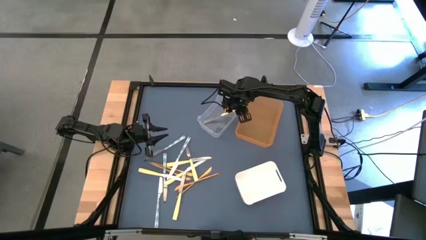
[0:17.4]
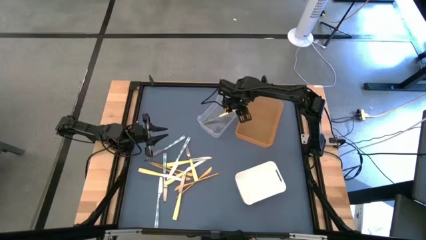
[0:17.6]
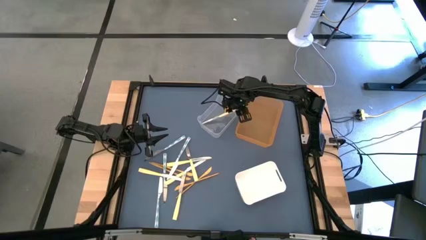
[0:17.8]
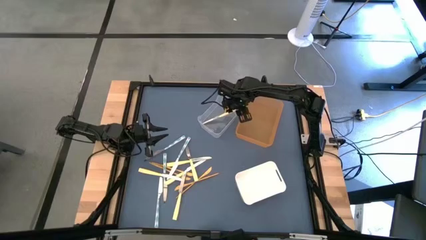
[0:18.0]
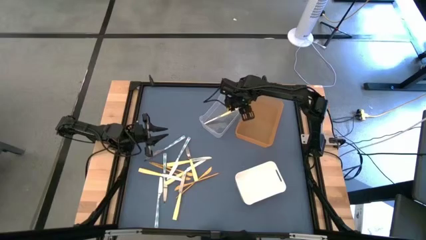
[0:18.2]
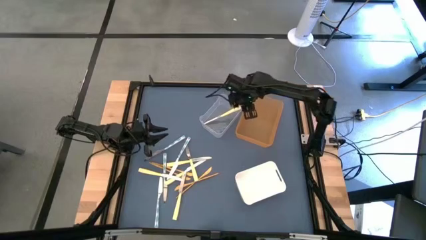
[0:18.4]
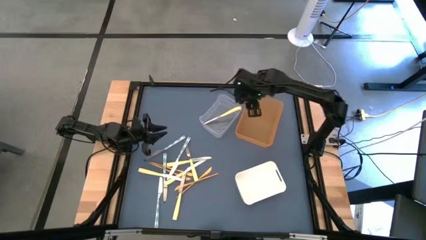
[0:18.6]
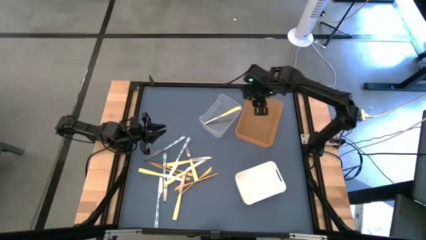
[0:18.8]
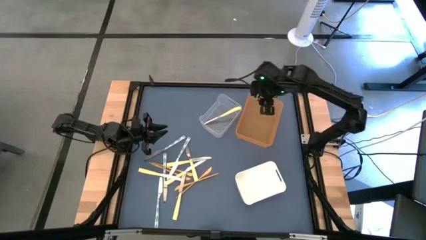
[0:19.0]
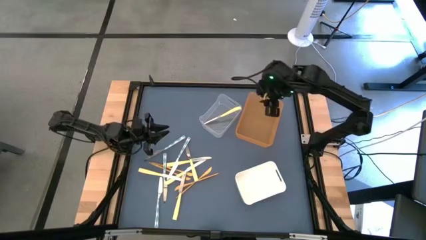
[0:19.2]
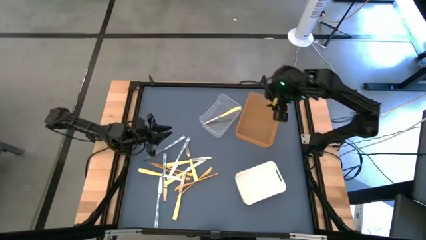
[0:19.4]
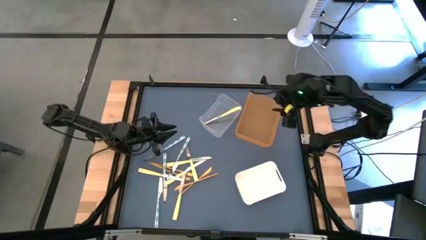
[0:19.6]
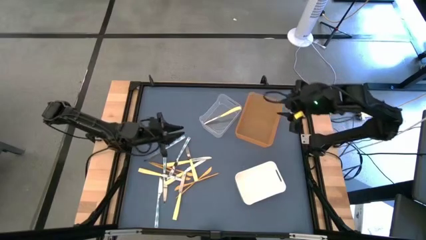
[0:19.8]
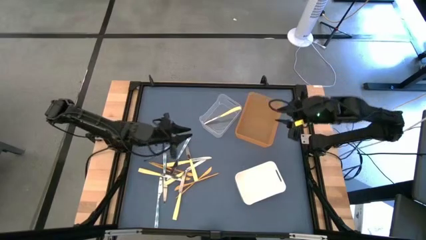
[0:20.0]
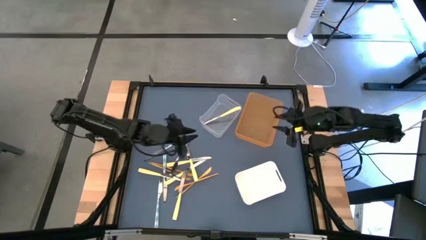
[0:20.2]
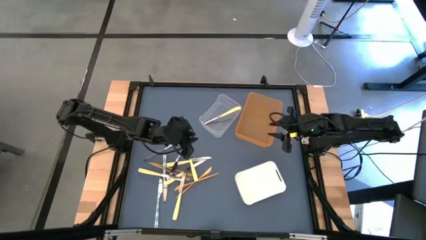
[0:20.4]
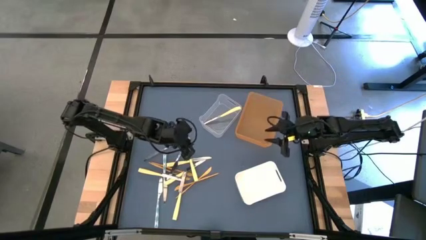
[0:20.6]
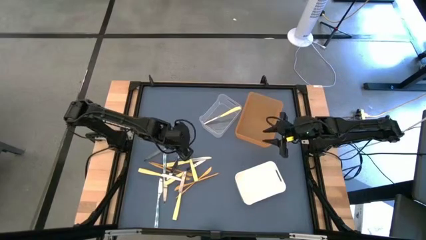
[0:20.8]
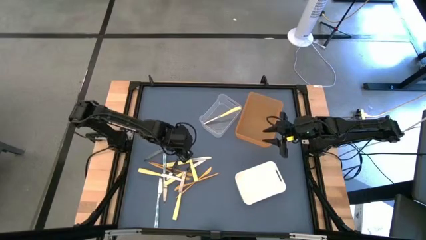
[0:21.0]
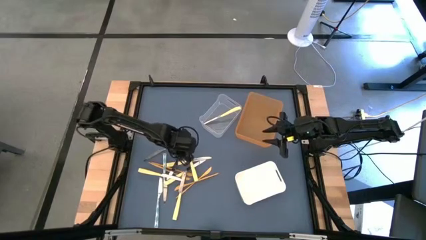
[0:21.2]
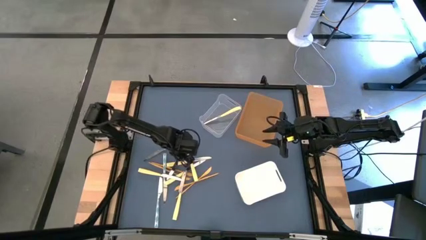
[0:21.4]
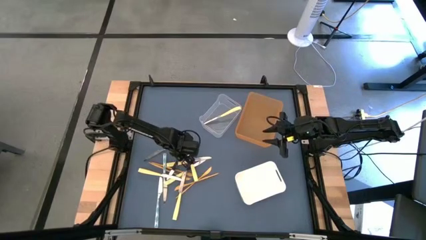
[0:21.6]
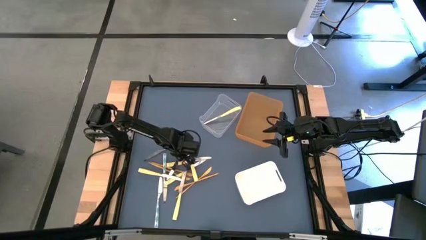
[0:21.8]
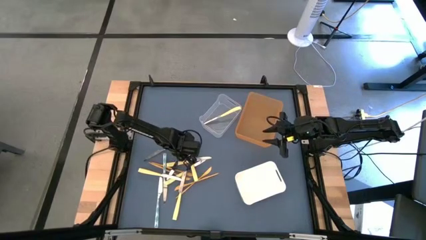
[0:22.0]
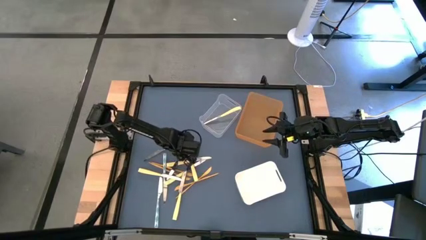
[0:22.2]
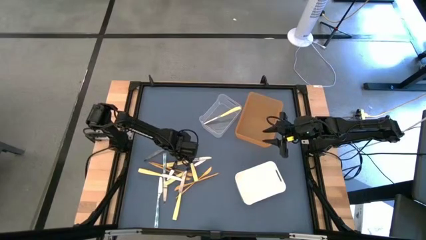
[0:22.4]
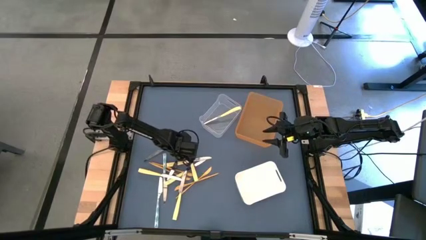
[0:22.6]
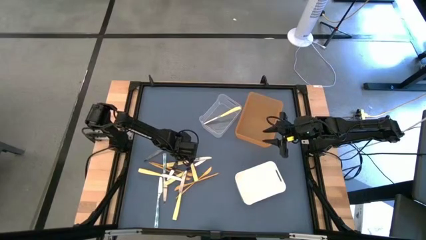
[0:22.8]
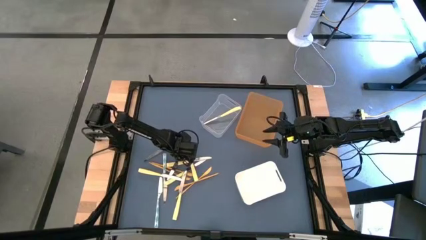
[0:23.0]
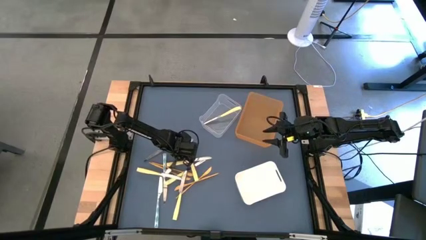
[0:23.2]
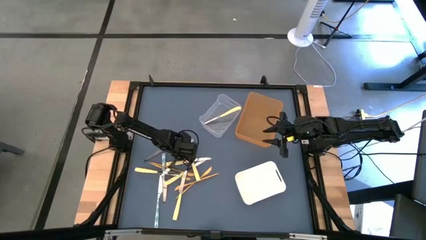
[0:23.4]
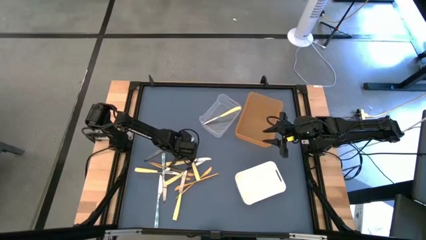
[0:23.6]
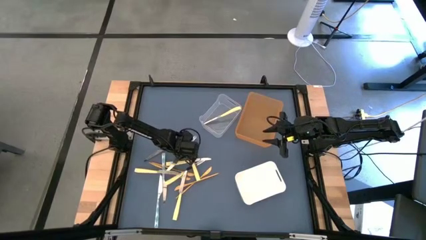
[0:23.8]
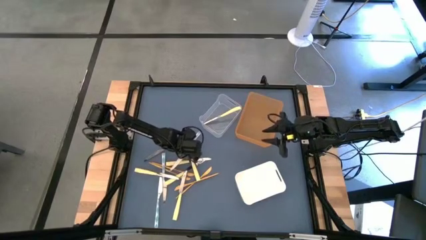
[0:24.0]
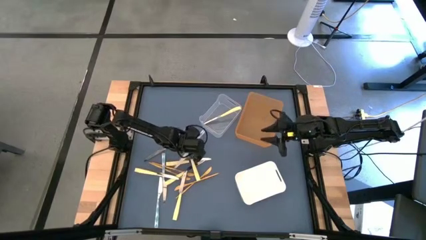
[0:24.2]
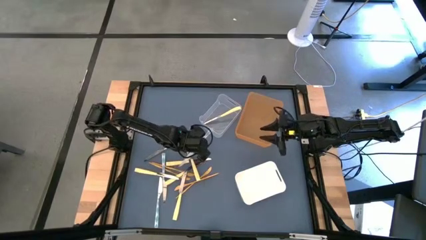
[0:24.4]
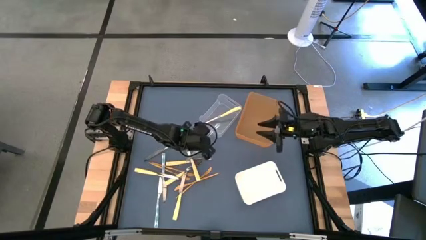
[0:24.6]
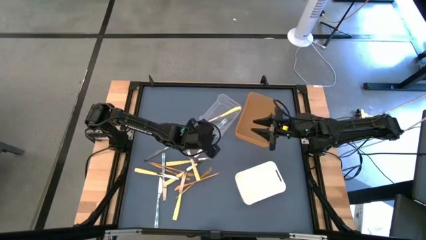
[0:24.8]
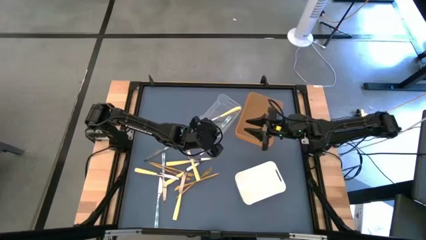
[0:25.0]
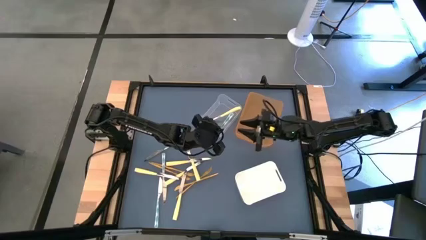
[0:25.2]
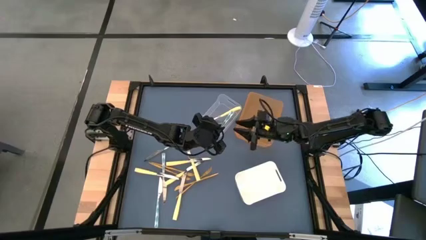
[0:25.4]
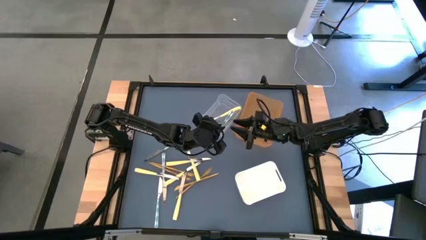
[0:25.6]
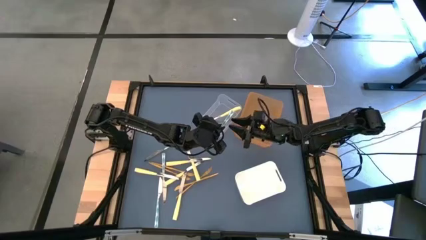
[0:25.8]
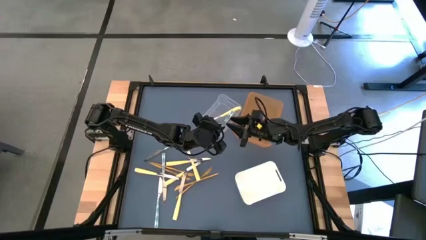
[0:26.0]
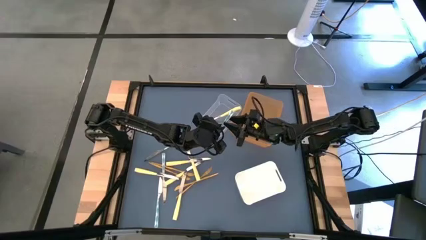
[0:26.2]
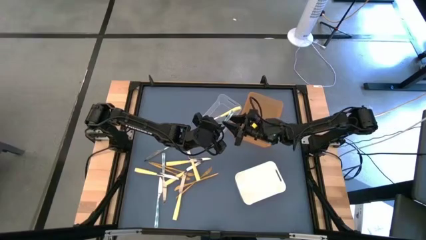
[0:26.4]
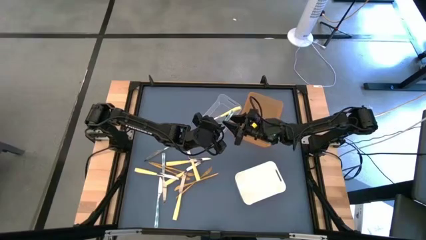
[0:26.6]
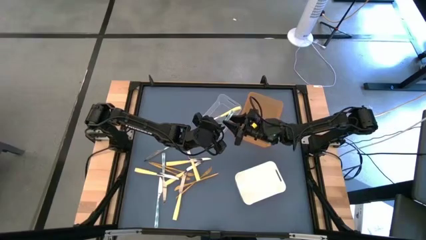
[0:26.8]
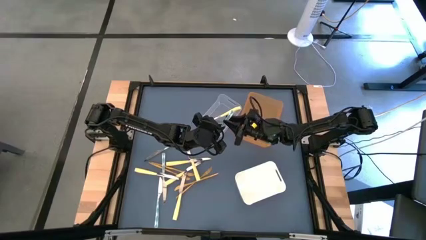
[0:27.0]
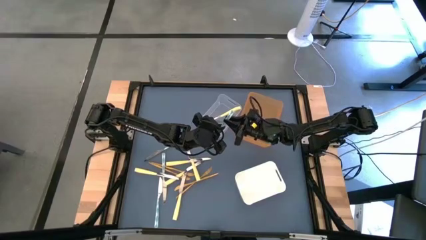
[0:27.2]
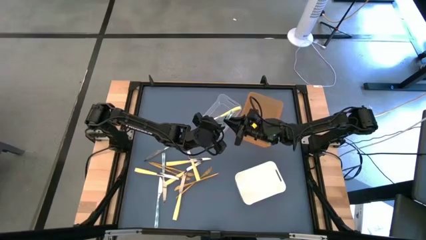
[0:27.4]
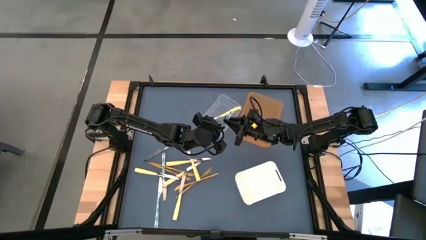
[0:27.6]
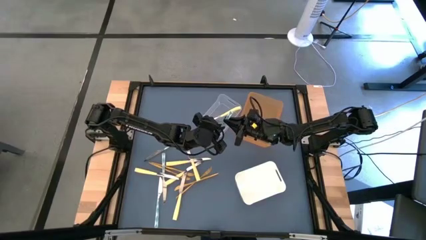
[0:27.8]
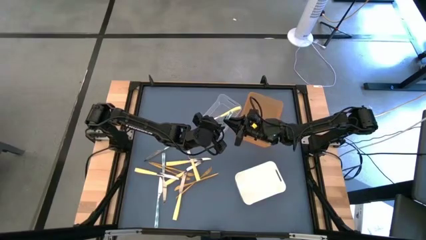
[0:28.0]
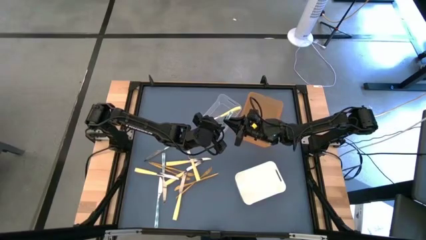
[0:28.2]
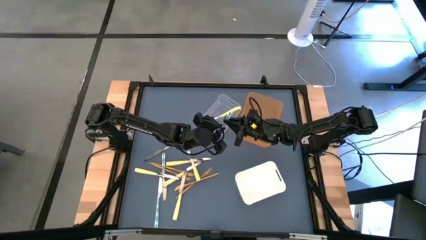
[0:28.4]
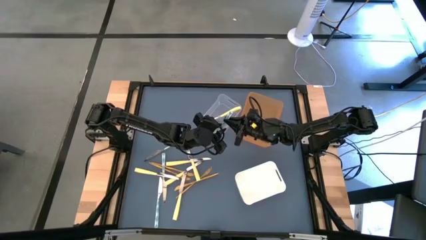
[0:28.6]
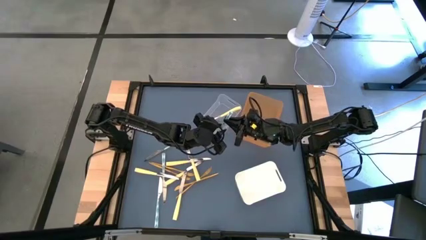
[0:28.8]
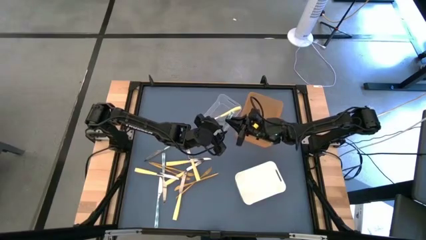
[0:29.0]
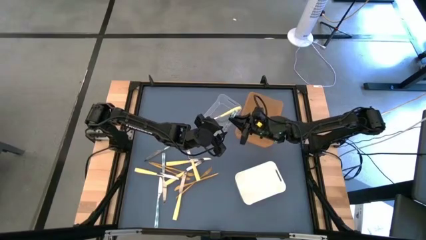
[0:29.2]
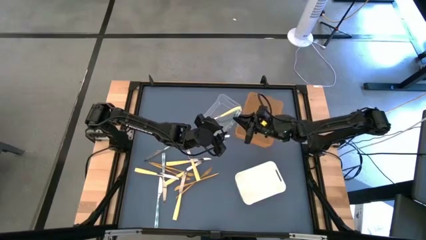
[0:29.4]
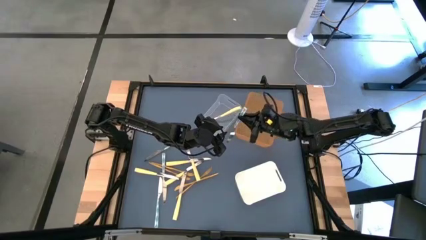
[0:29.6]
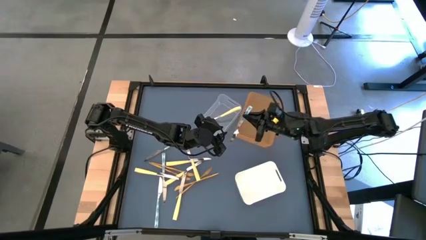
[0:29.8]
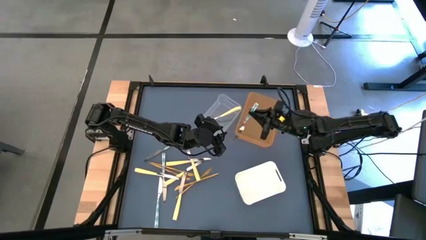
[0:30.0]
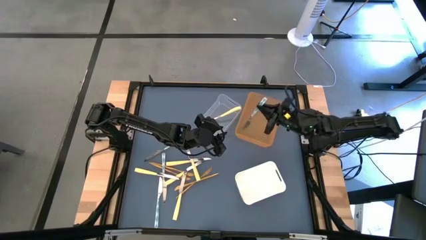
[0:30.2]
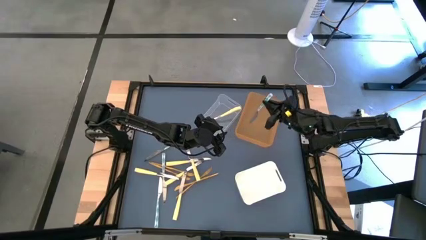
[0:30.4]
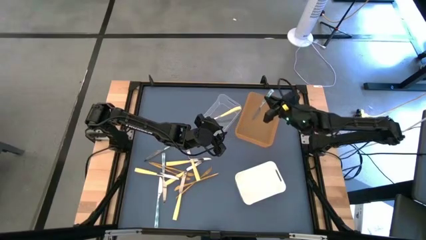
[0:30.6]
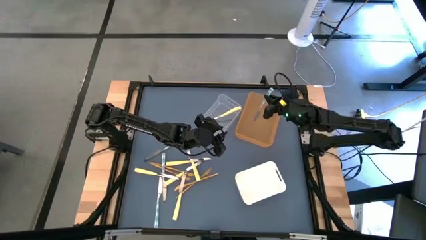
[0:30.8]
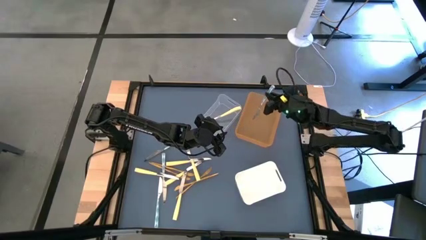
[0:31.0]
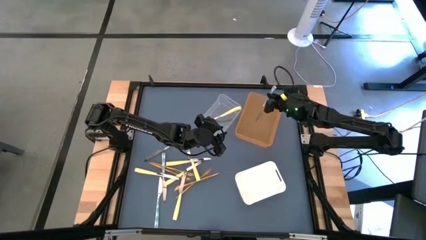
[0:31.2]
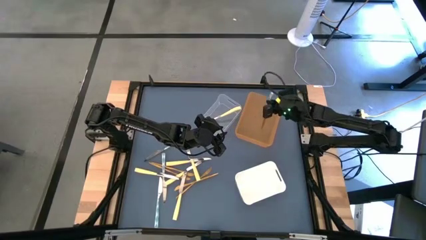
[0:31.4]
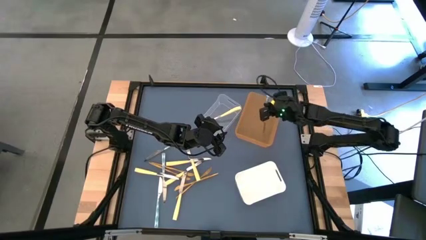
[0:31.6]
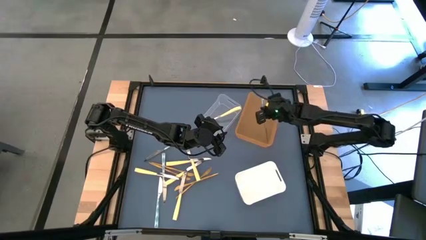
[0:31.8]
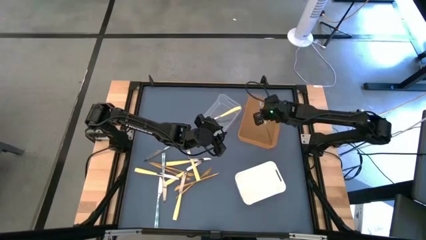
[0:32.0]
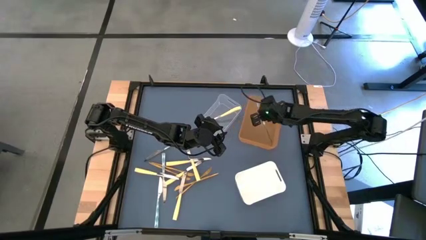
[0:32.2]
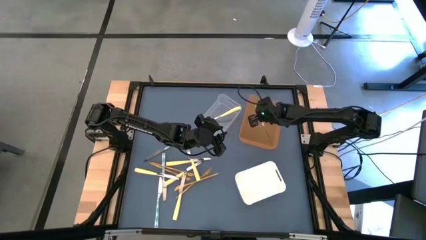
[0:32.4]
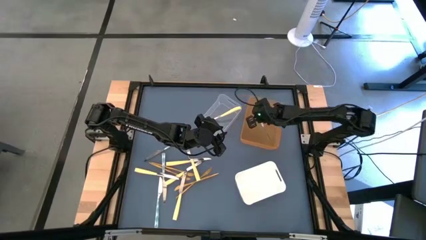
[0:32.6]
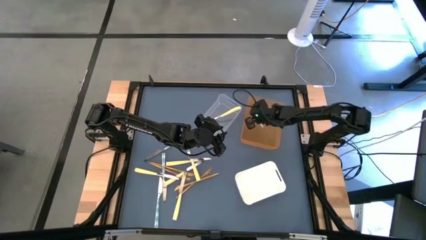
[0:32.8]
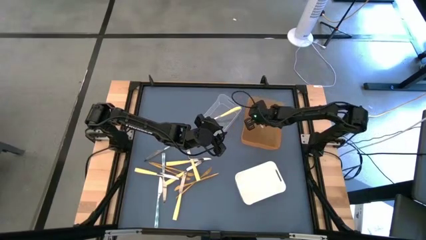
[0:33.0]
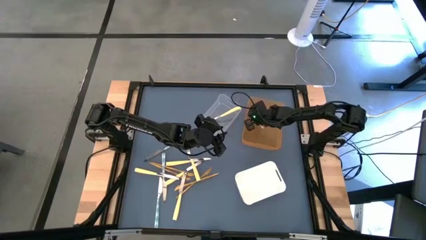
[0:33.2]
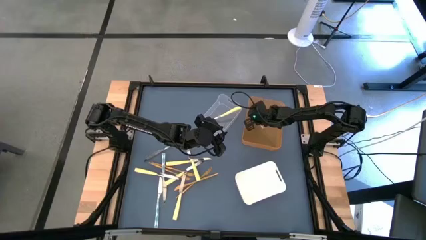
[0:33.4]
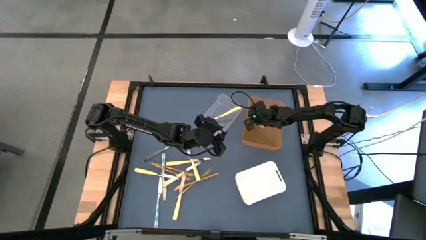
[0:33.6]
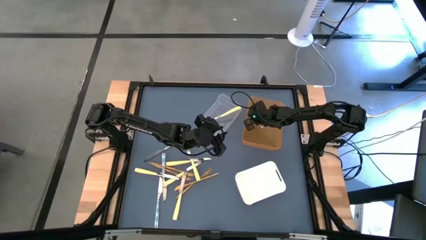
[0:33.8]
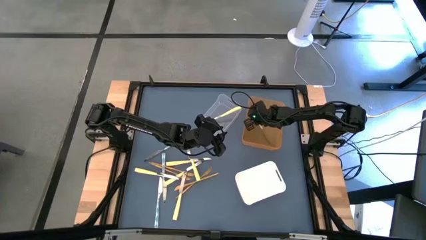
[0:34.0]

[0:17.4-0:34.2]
Task: Sort silverware by color (type)
Put the white knife into the orange bin
